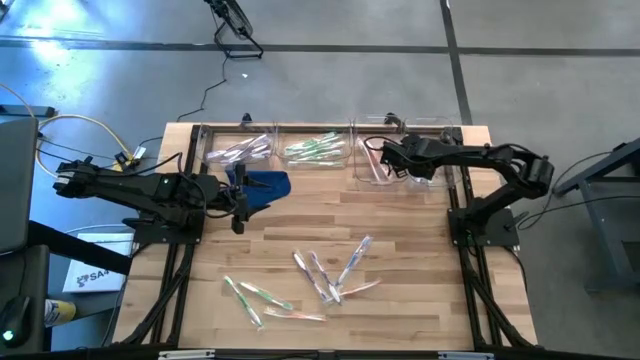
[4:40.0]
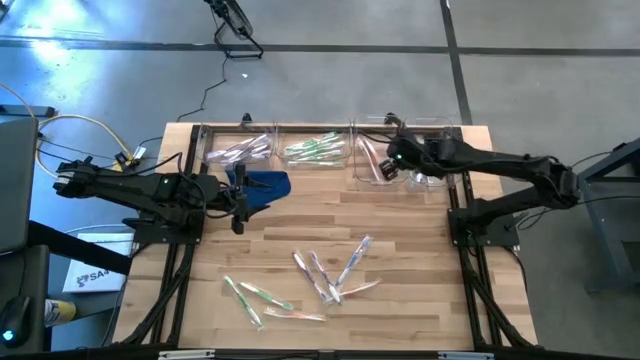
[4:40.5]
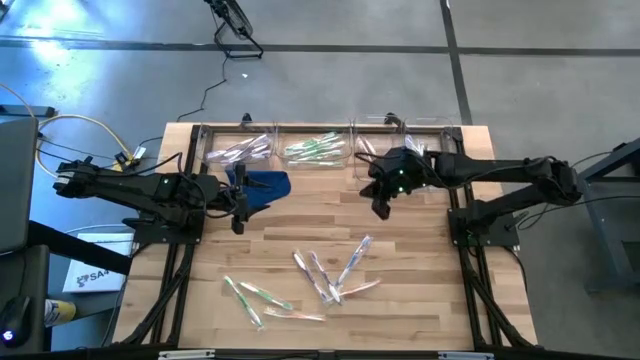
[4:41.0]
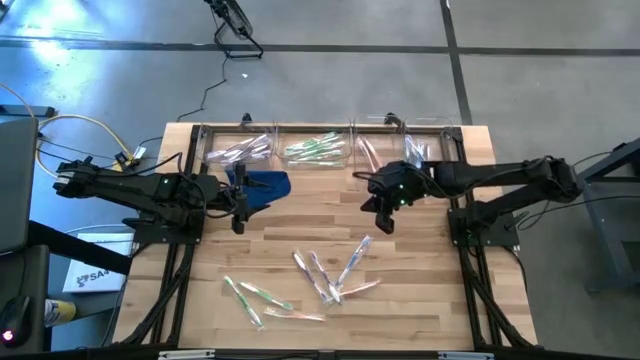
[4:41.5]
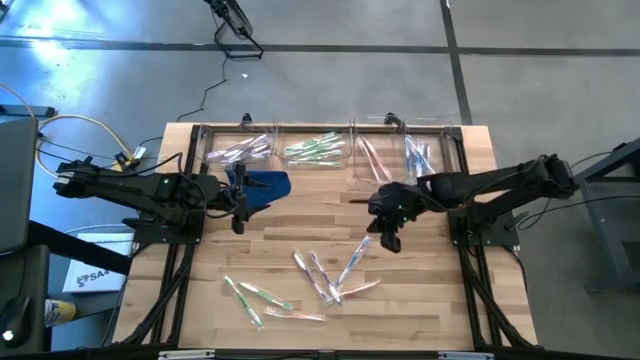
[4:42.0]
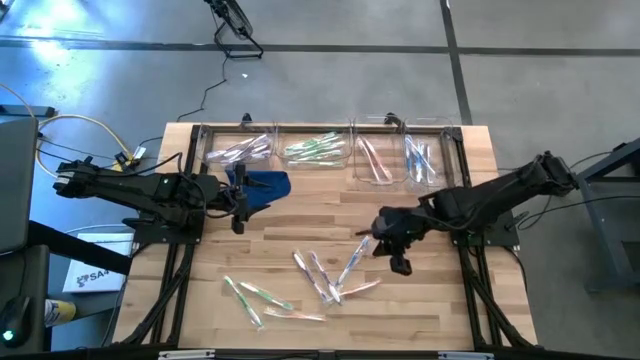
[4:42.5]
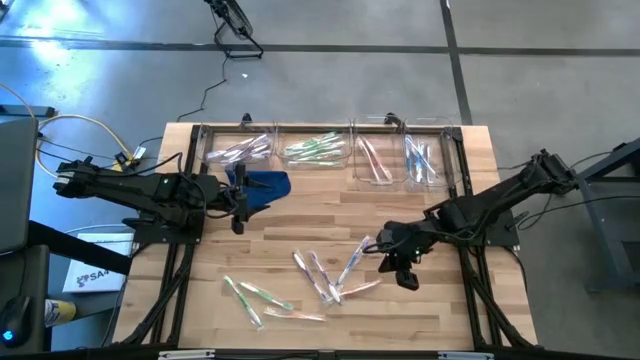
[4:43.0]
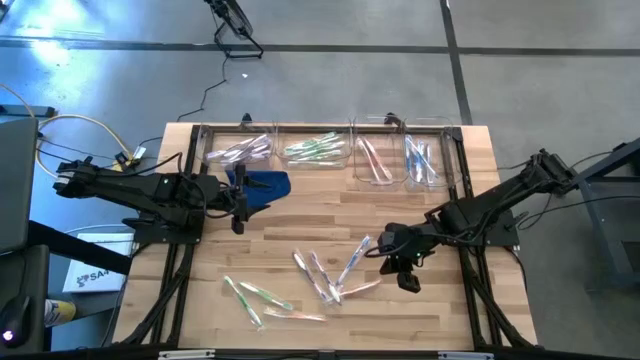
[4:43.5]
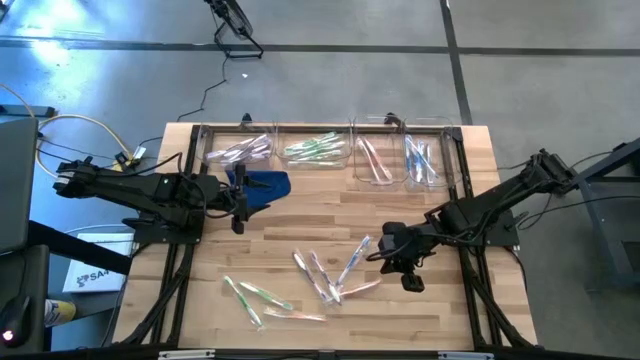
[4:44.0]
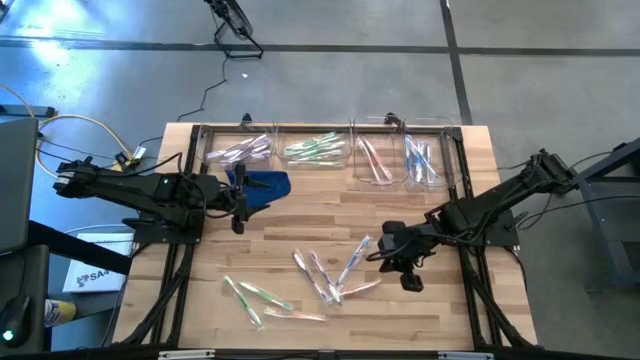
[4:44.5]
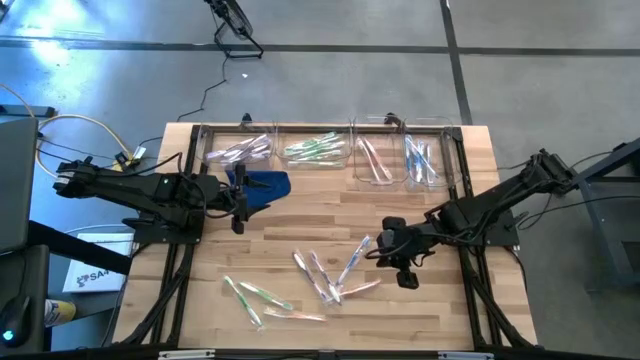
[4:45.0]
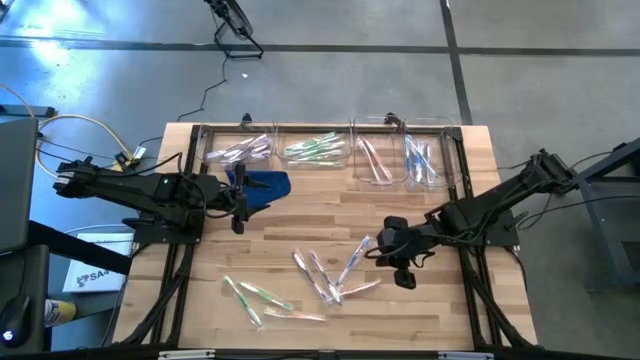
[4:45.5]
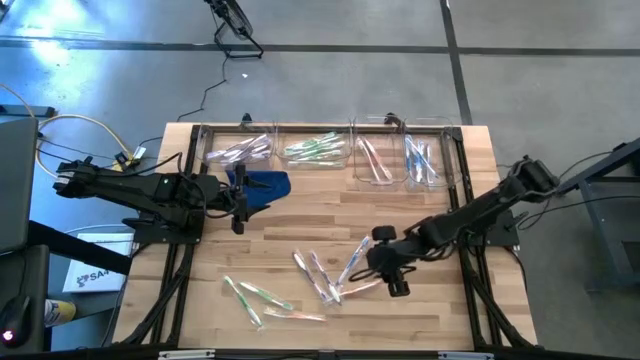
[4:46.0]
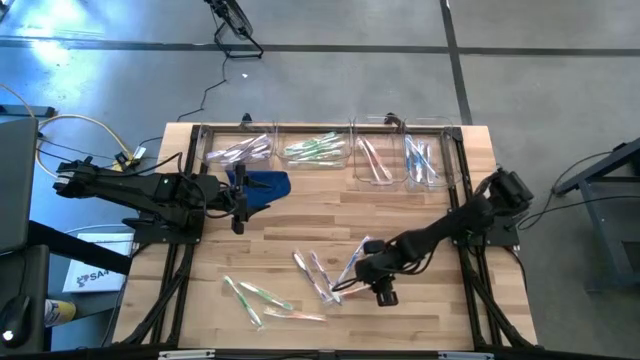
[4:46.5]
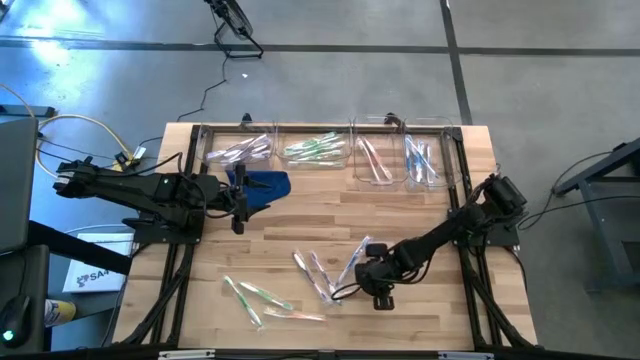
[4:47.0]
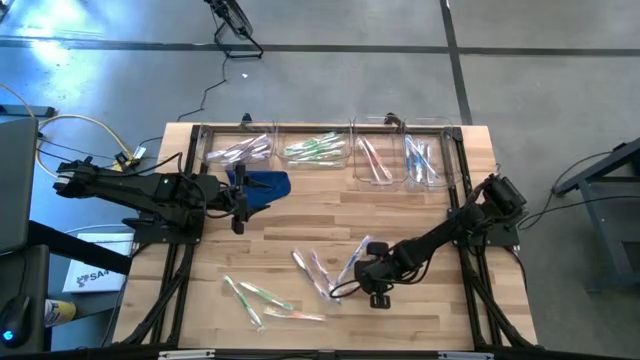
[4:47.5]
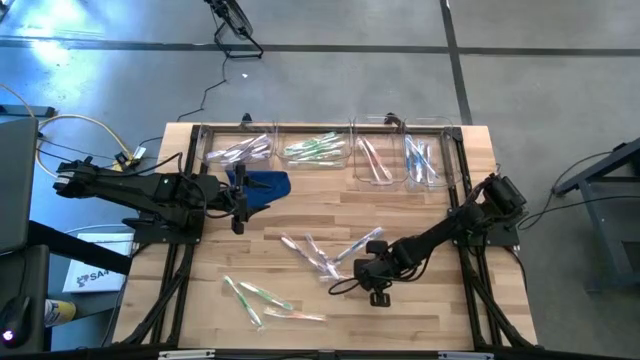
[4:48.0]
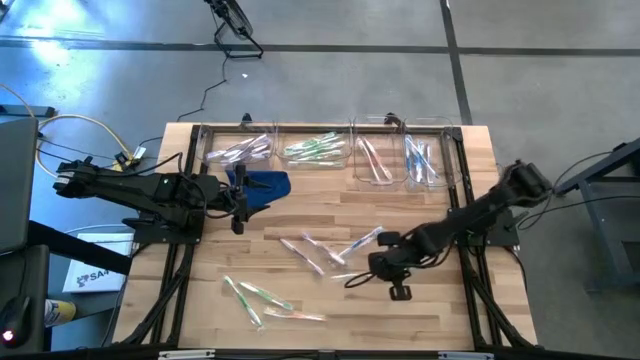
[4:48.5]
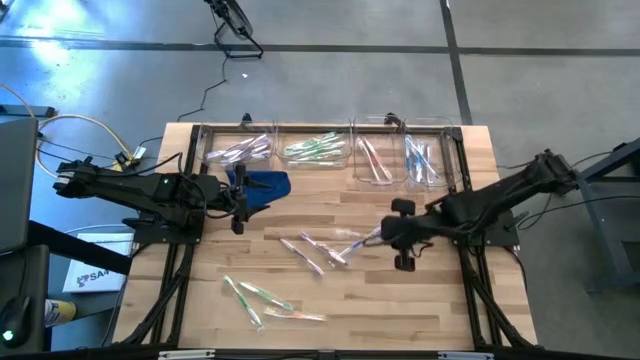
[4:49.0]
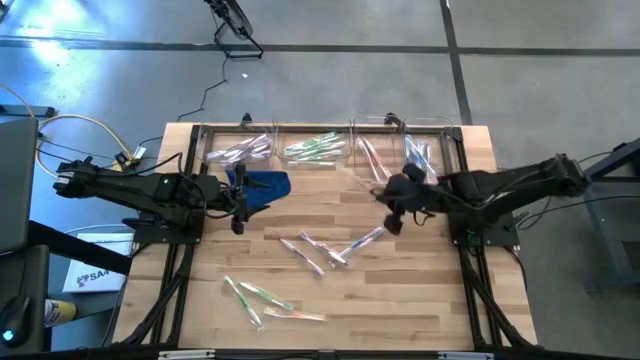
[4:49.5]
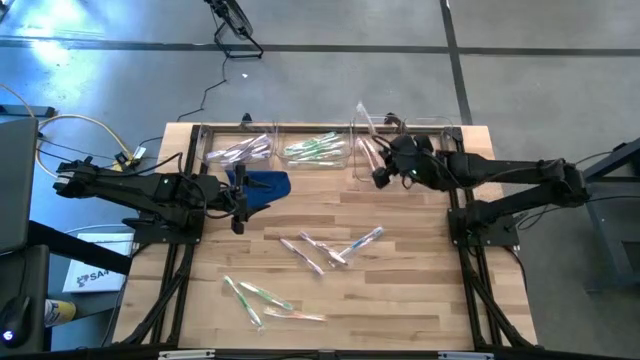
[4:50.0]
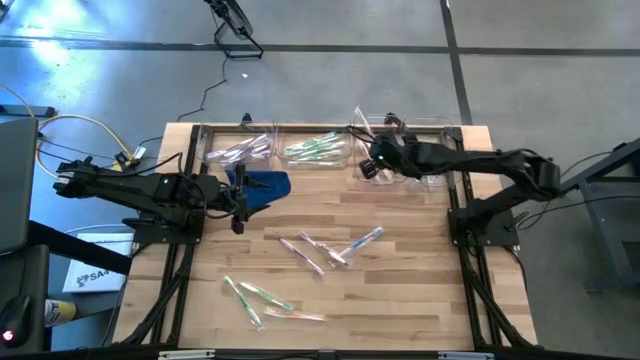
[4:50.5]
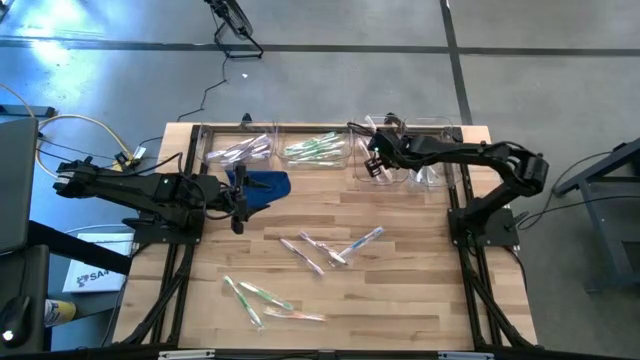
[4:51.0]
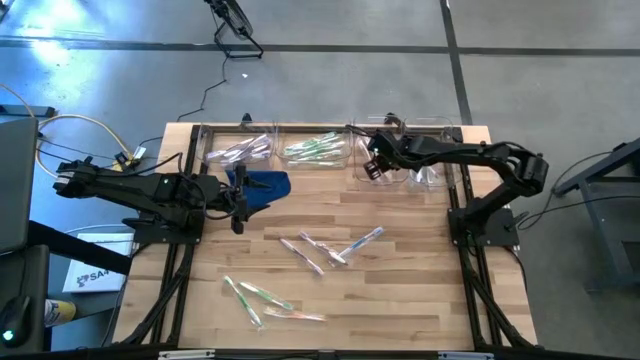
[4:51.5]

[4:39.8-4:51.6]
Task: Pick & Place Toothbrushes
Put the orange toothbrush into the middle right transparent bin

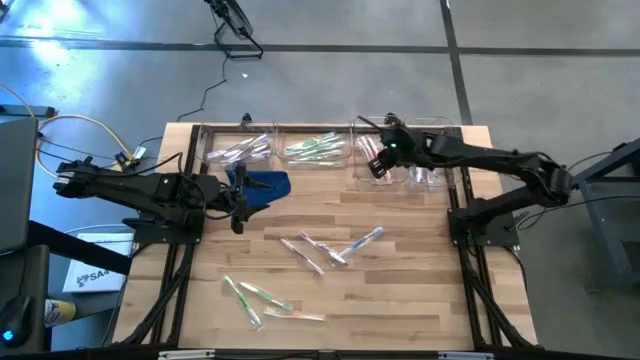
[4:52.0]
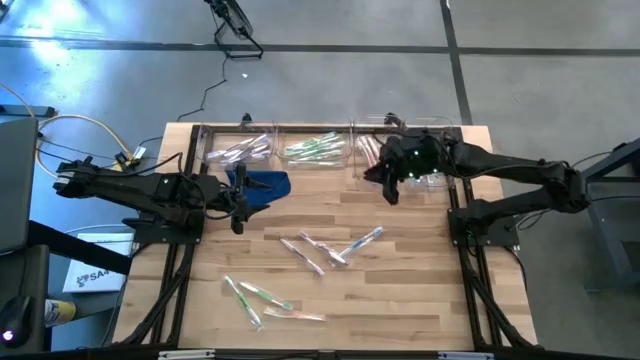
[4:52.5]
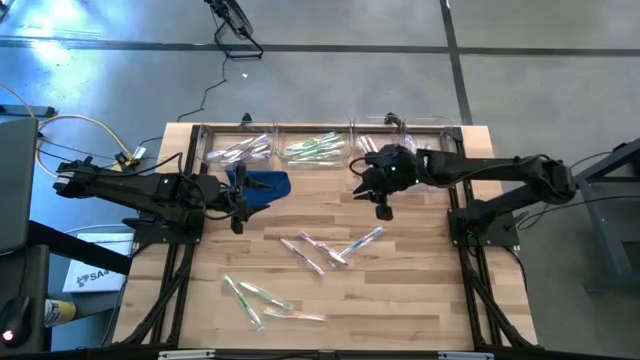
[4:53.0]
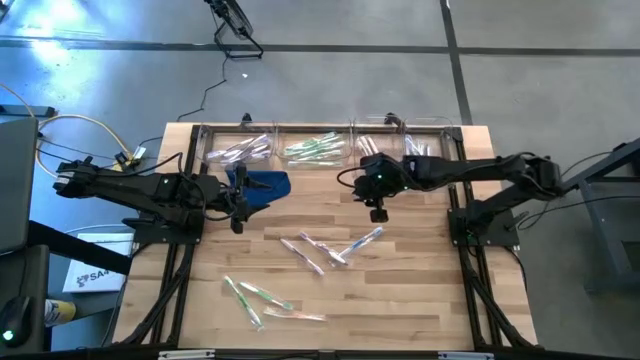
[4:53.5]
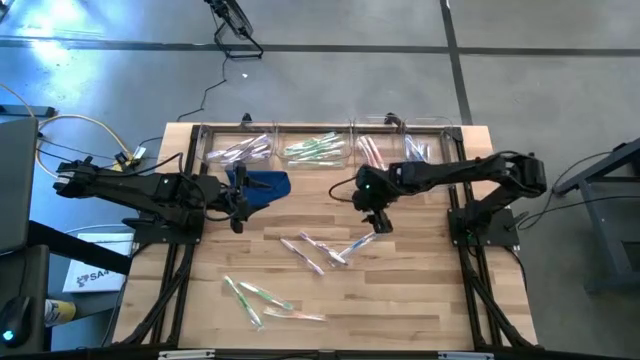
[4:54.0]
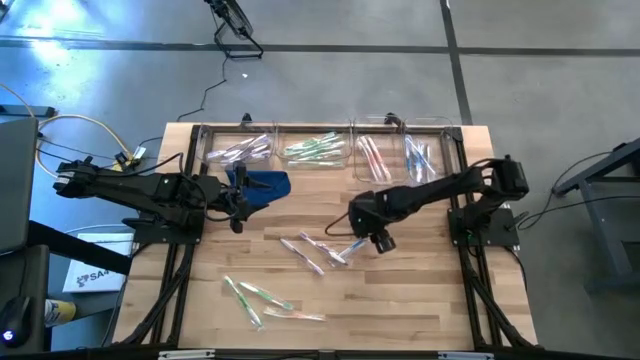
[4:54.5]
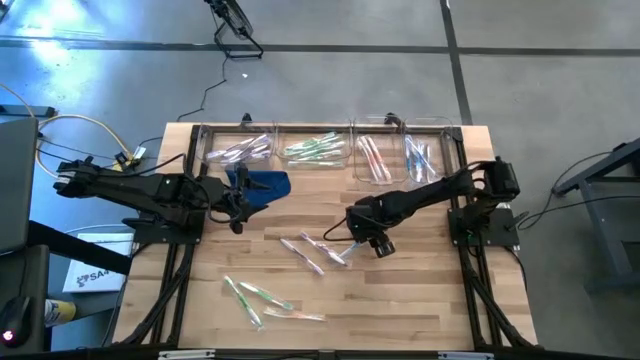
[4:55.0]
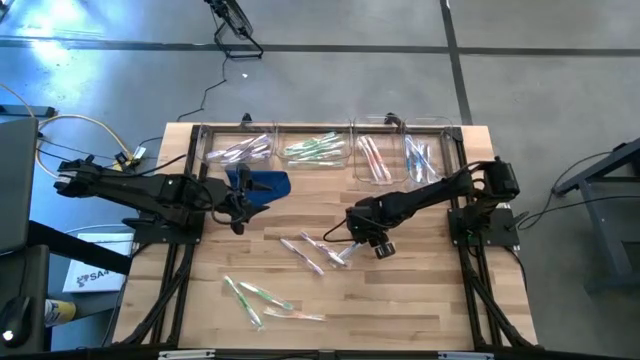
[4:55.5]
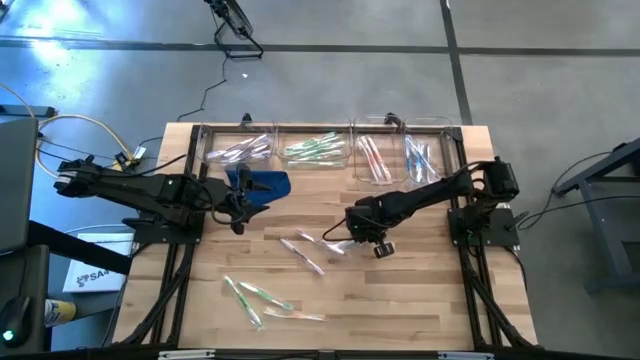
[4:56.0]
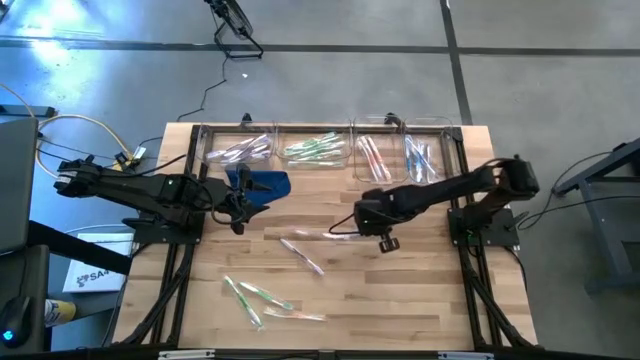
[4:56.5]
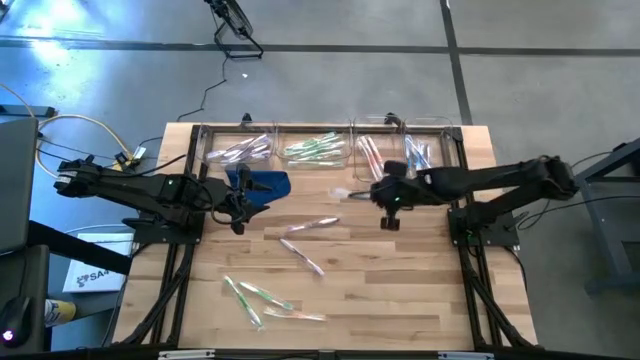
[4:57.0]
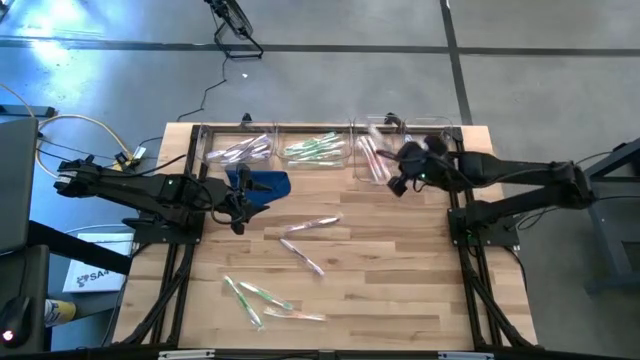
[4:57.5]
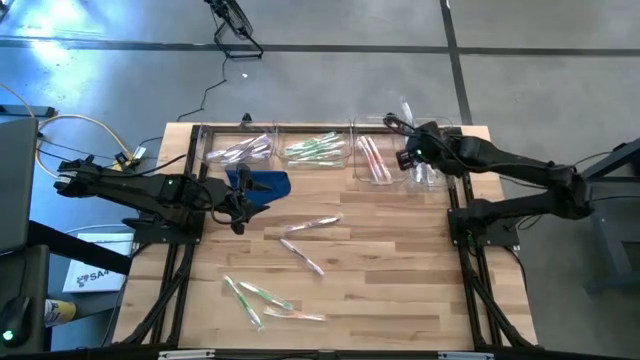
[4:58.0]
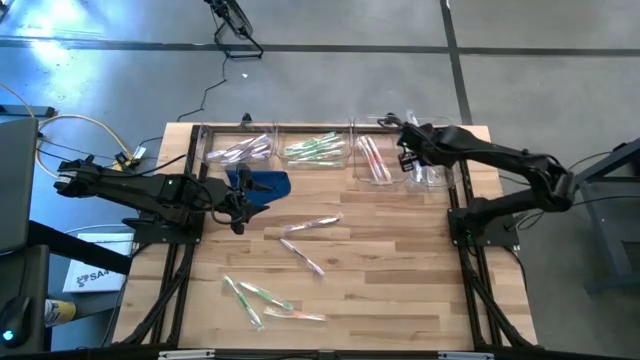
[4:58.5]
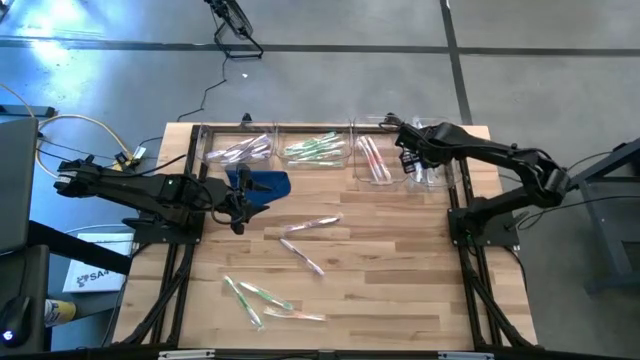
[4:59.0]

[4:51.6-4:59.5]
Put the blue toothbrush into the right transparent bin
